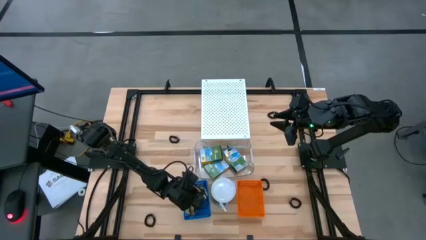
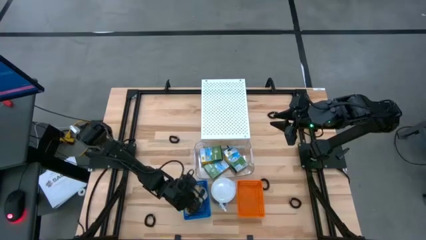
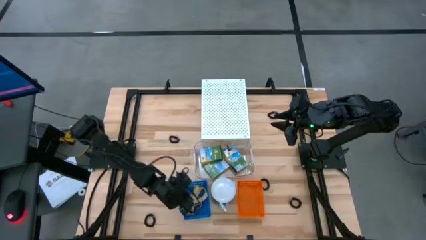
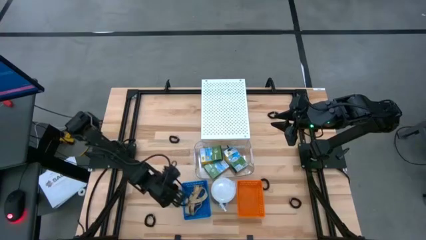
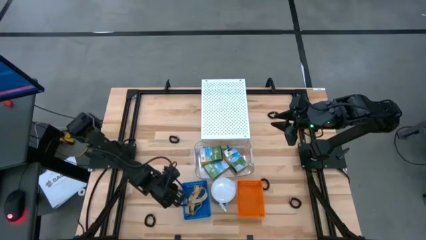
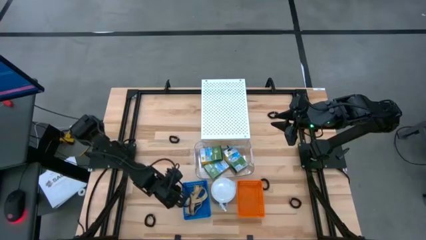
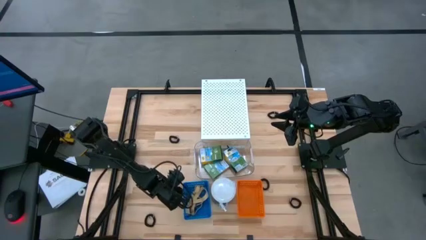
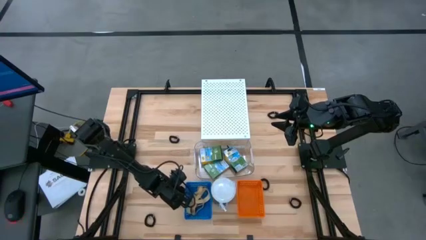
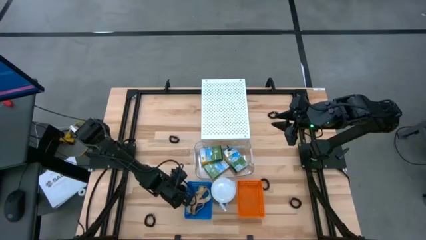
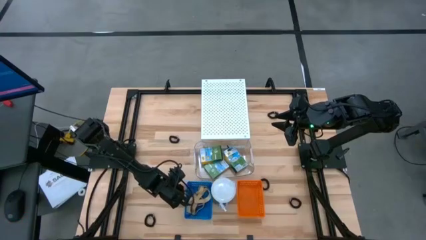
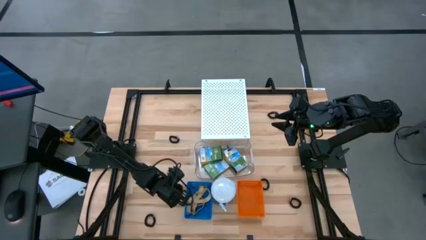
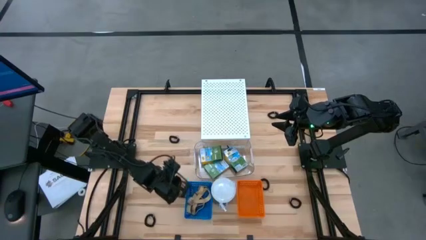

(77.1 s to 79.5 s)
Task: Pick & Place Office Desk Supplies
Adjust the blue bin

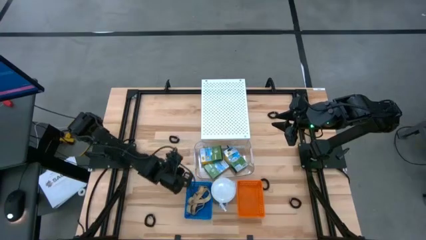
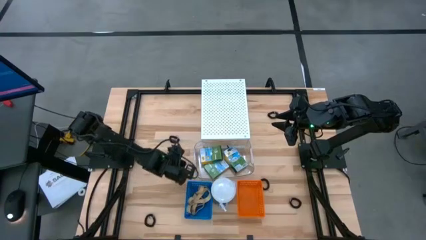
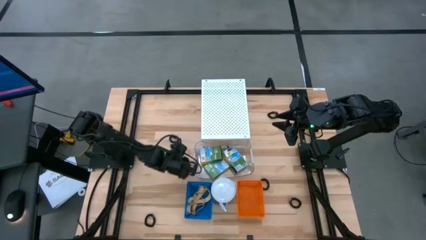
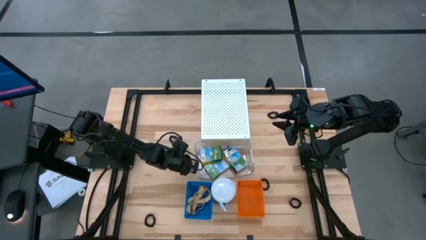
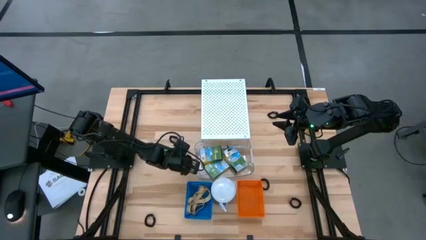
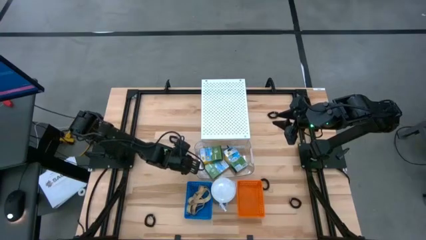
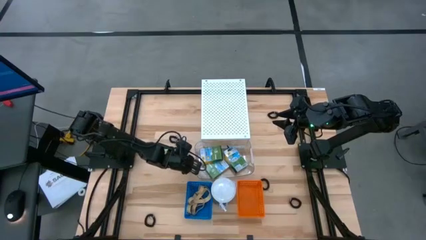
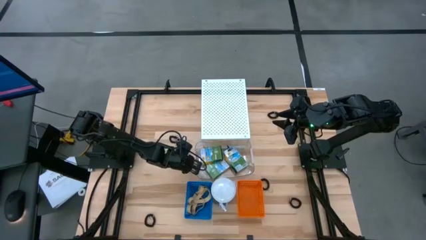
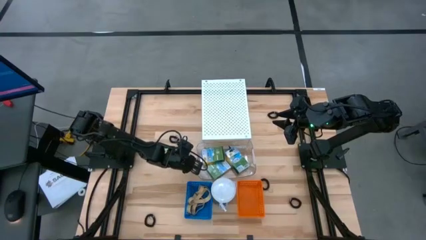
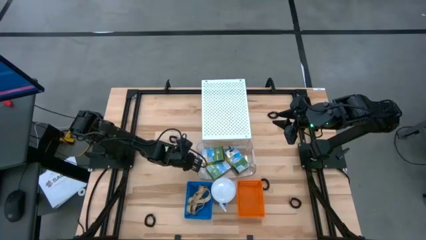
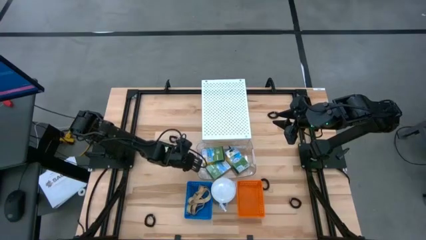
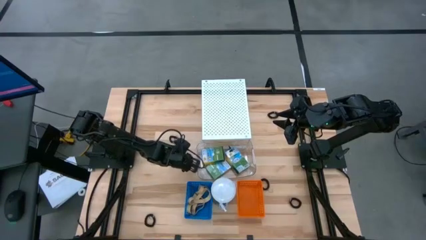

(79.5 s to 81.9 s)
Adjust the transparent bin

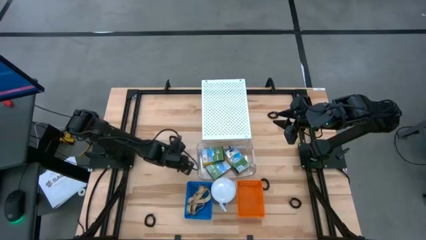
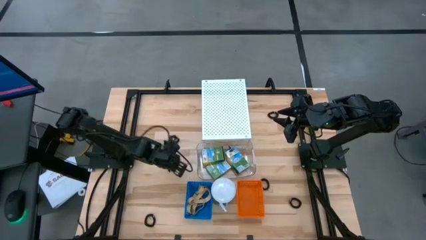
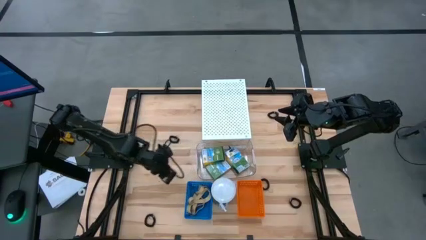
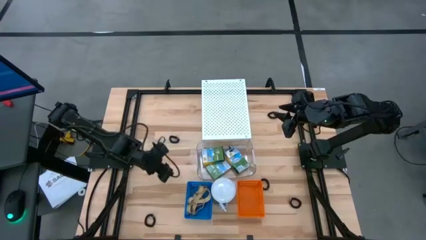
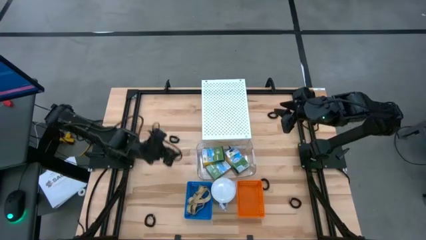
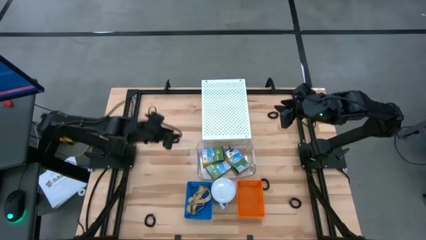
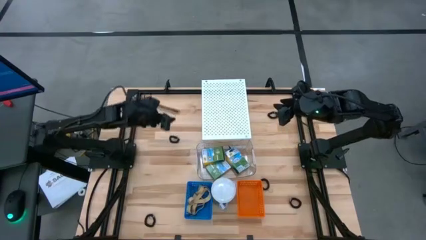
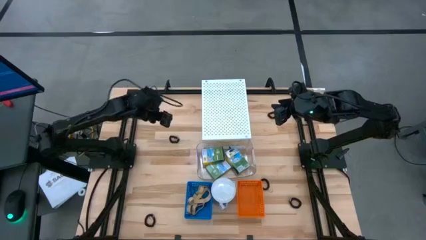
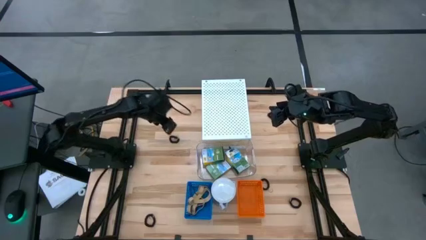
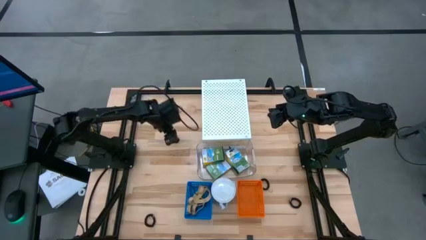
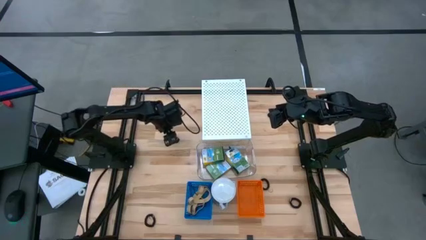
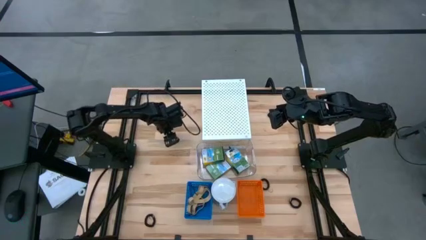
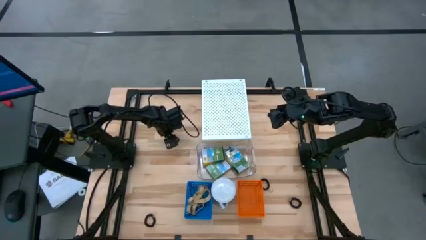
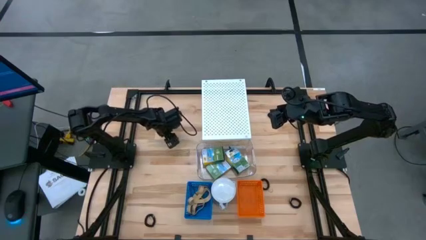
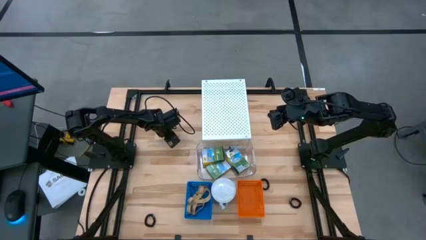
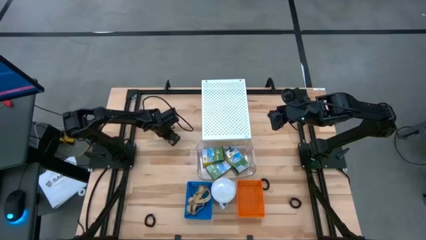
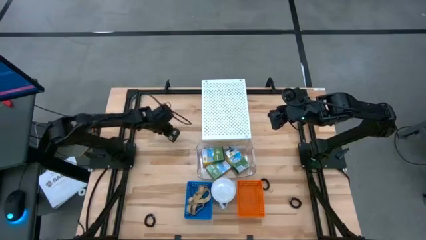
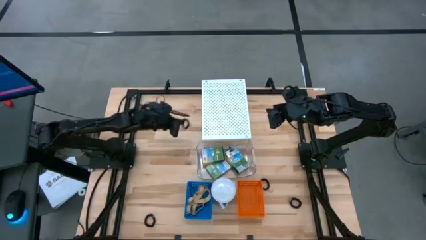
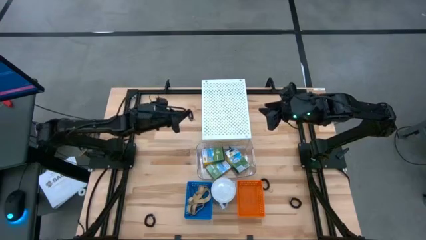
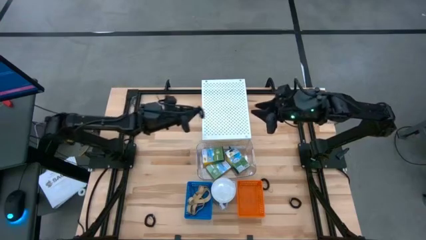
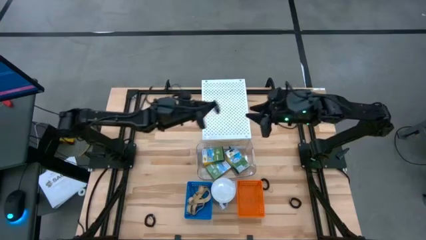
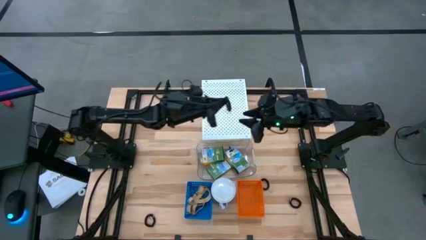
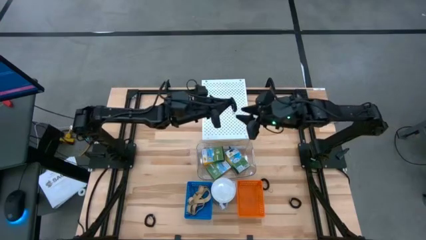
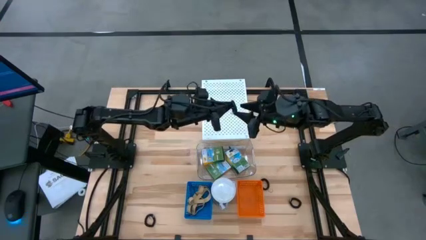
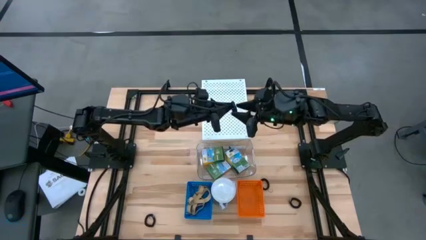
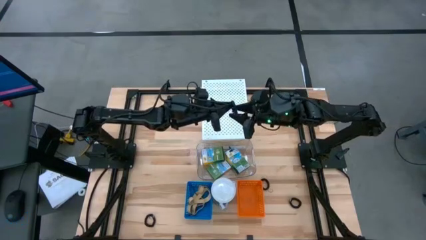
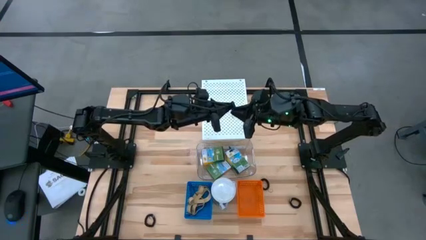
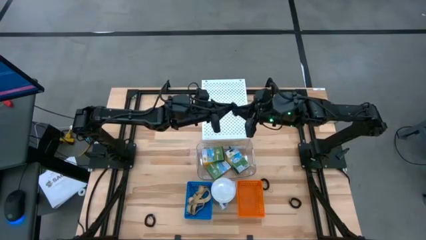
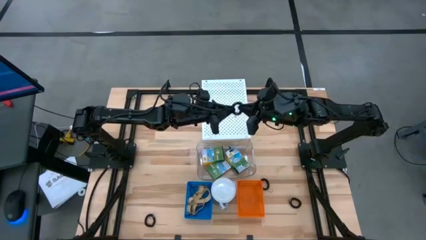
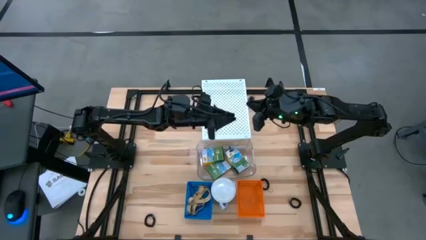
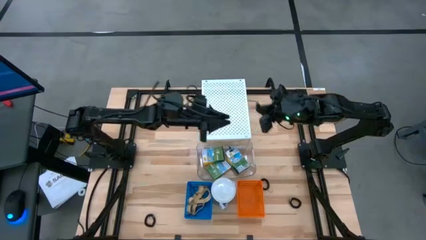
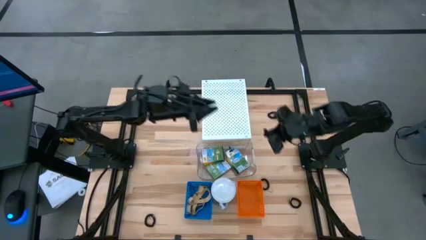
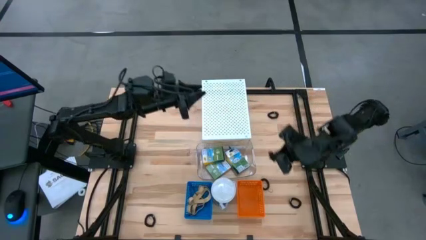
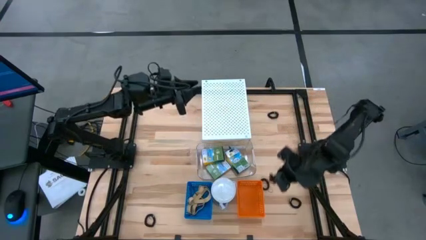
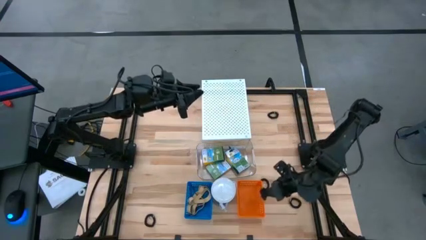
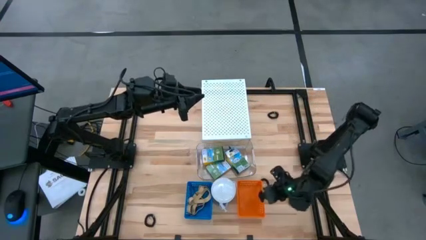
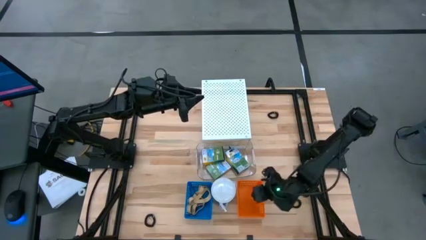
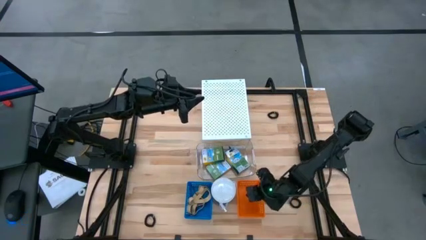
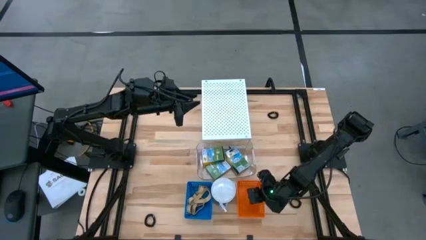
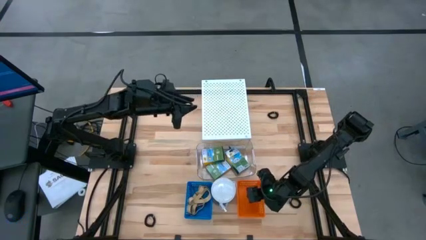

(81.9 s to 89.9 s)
Put the black spring keychain into the orange bin
